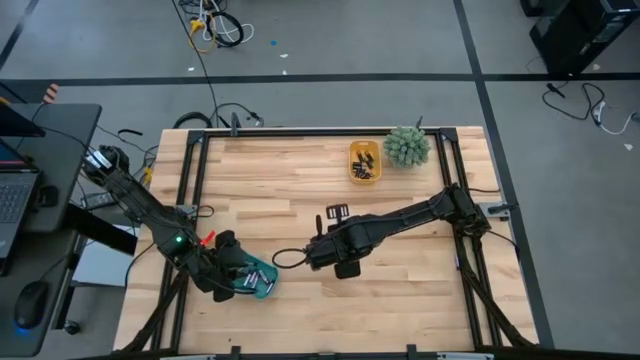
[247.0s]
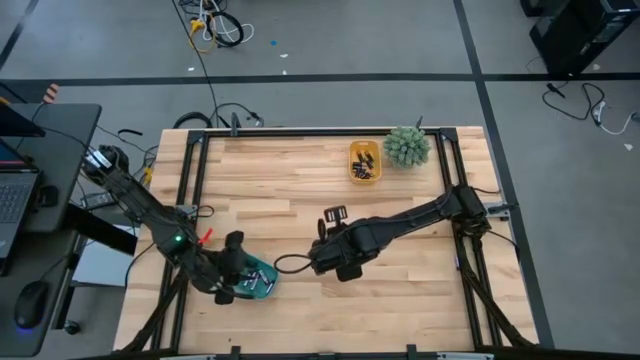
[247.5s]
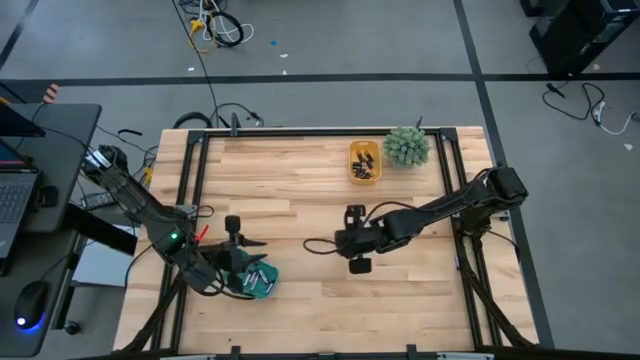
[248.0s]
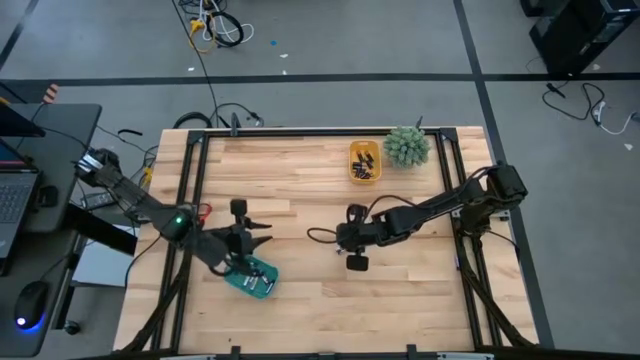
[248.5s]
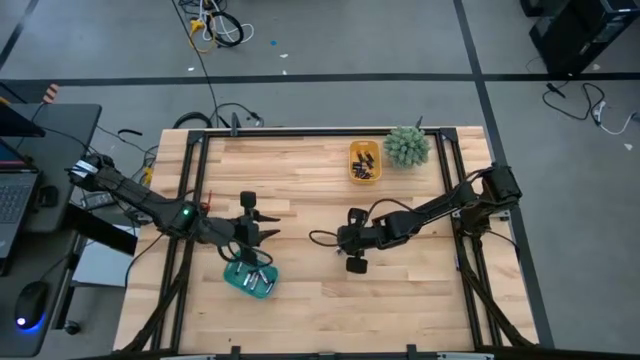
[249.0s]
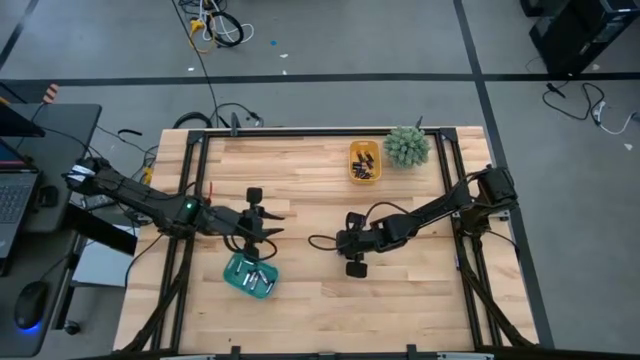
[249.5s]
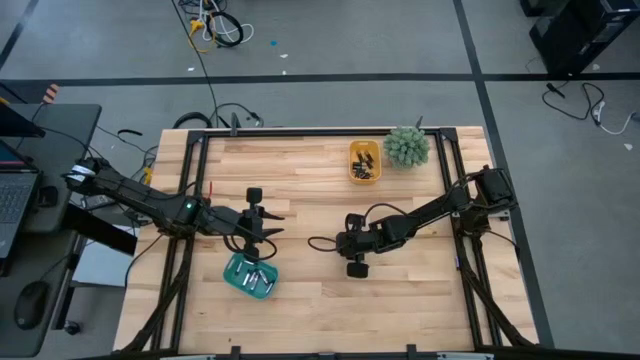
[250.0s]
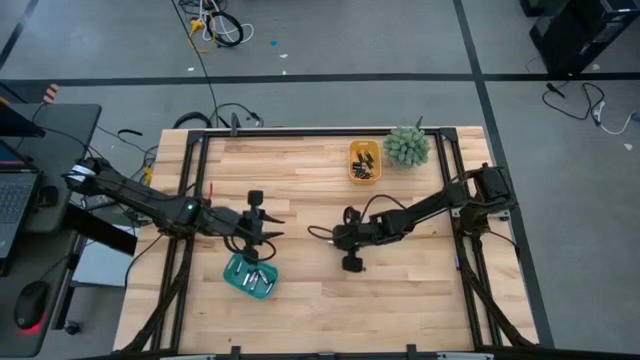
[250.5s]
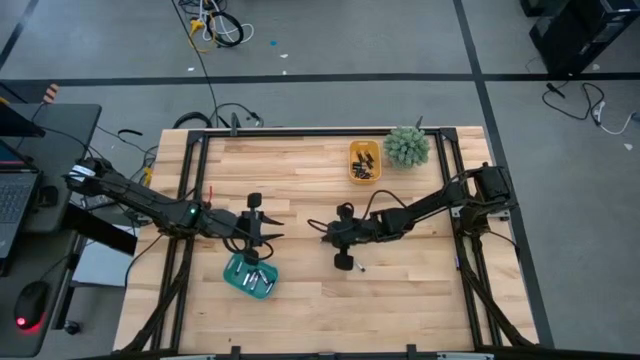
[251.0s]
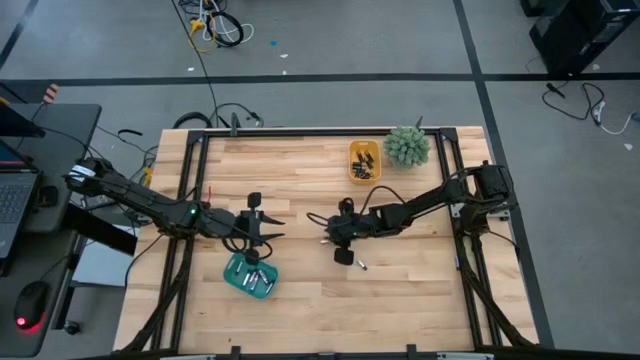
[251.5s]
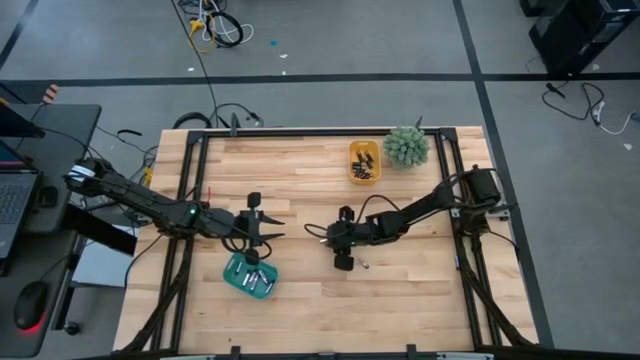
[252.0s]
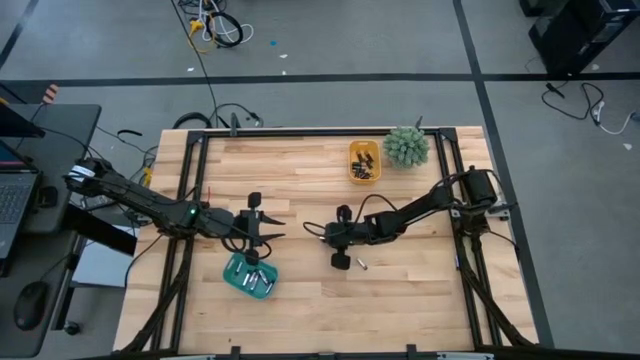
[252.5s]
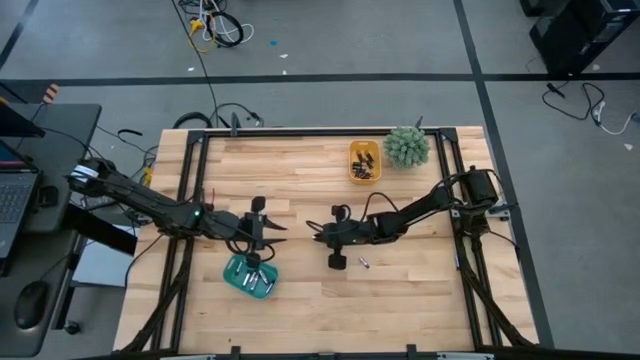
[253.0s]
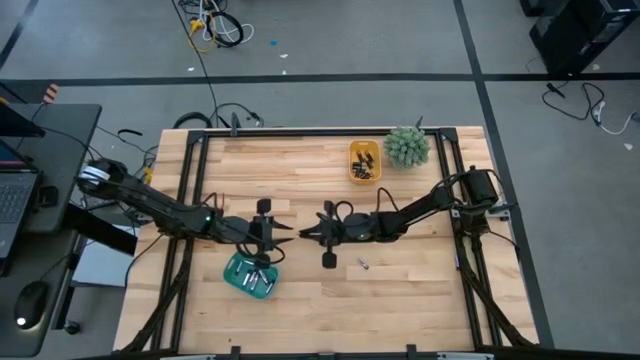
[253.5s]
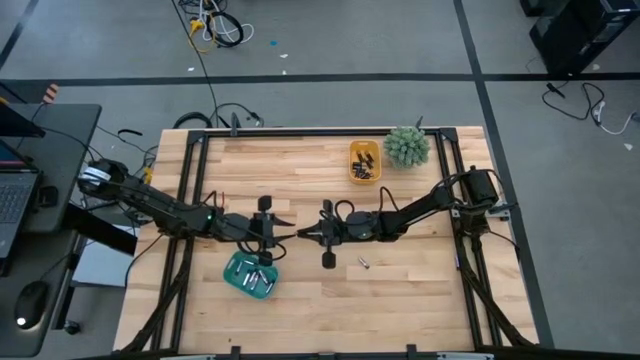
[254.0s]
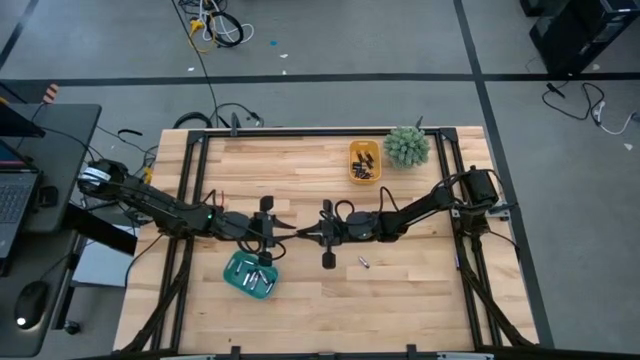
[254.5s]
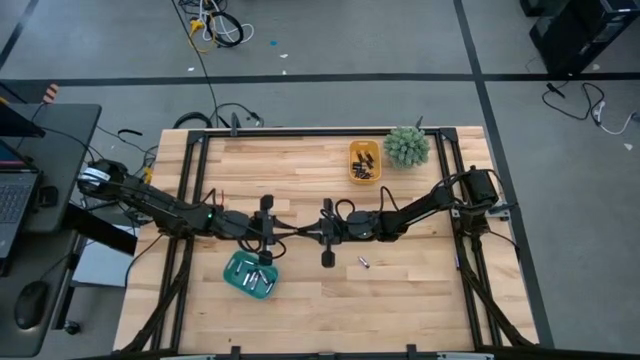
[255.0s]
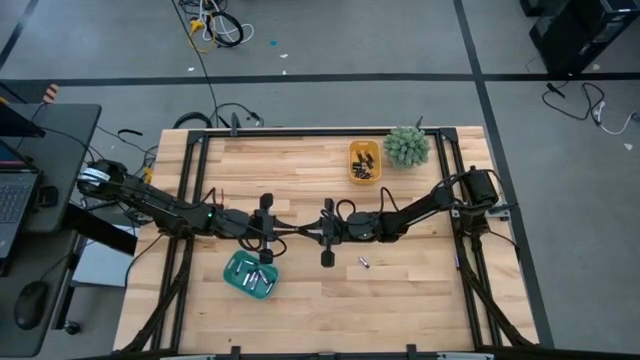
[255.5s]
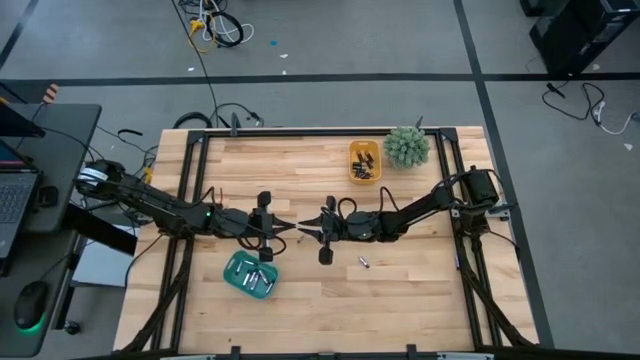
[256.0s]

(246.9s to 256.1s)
Task: Sort batteries
Put the silver battery into the green bin

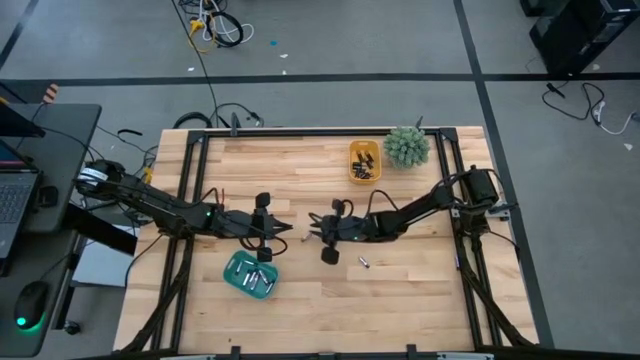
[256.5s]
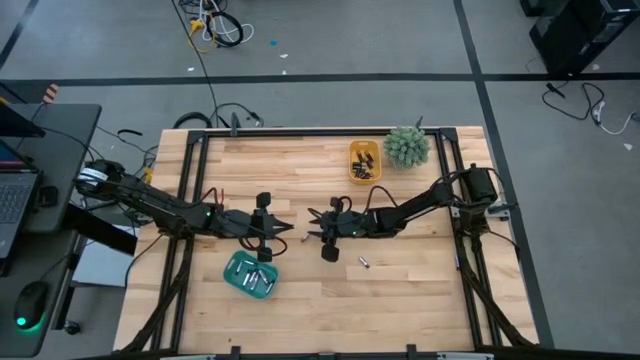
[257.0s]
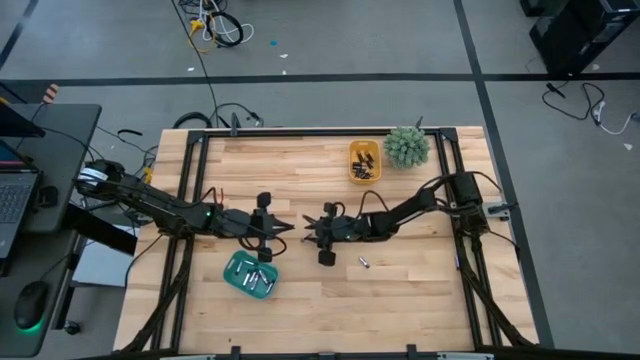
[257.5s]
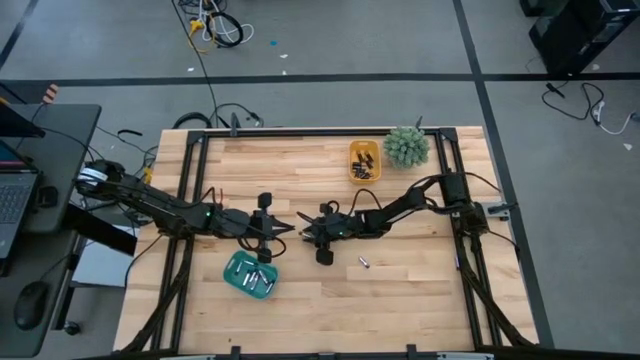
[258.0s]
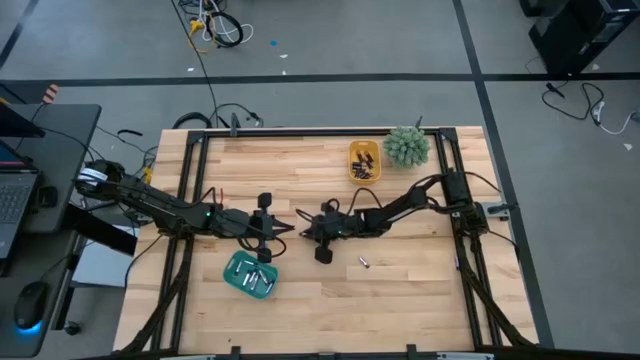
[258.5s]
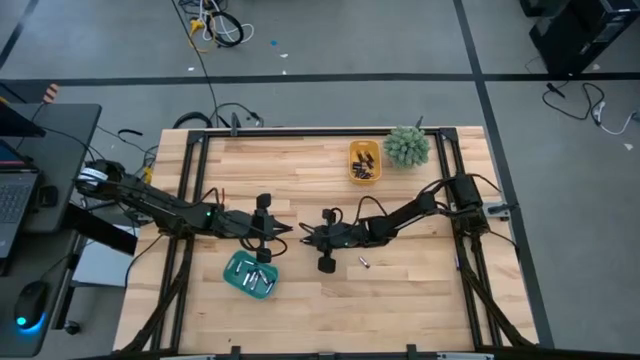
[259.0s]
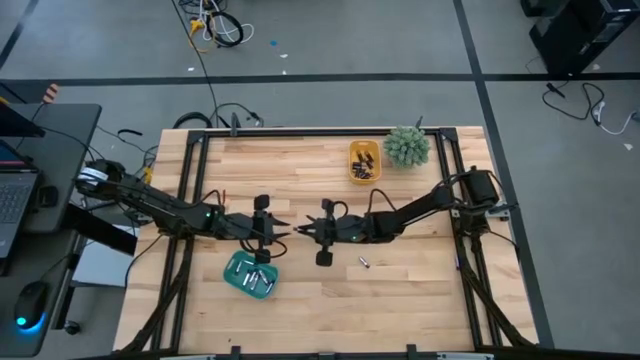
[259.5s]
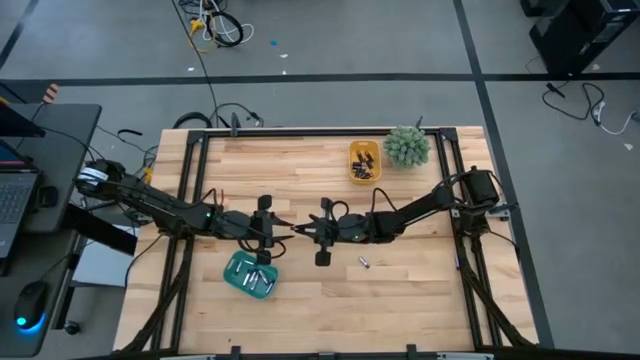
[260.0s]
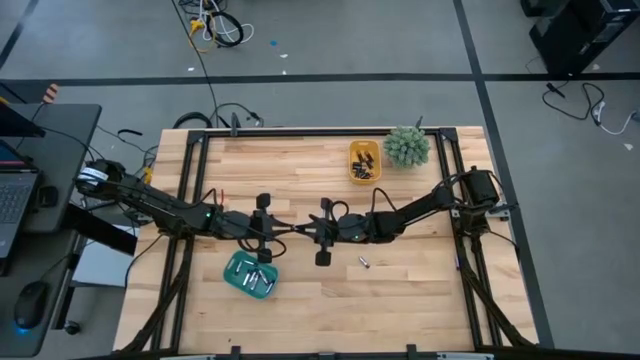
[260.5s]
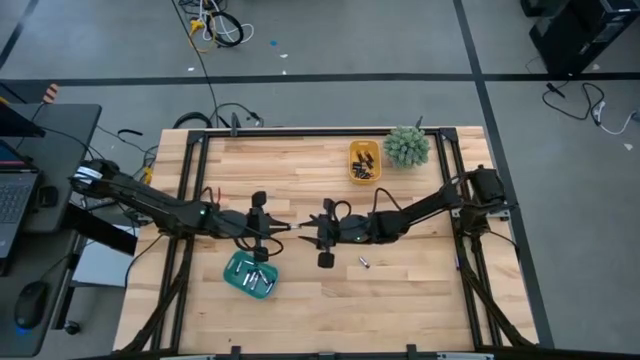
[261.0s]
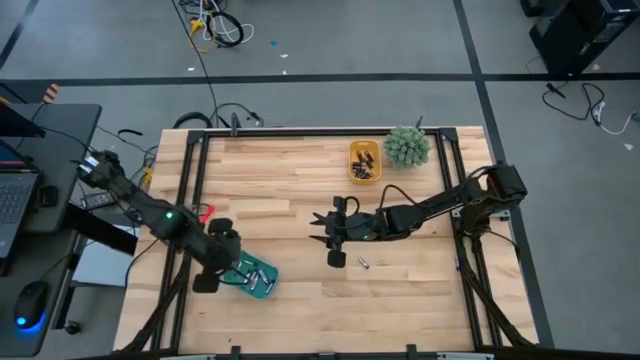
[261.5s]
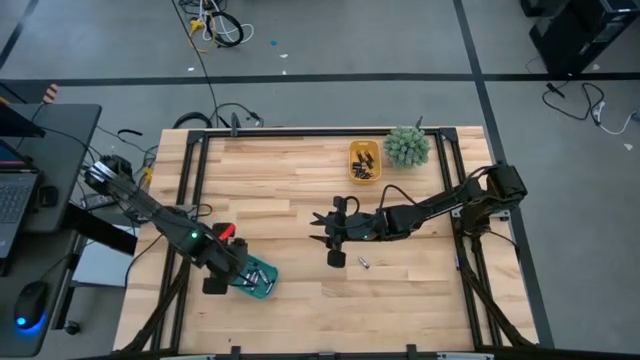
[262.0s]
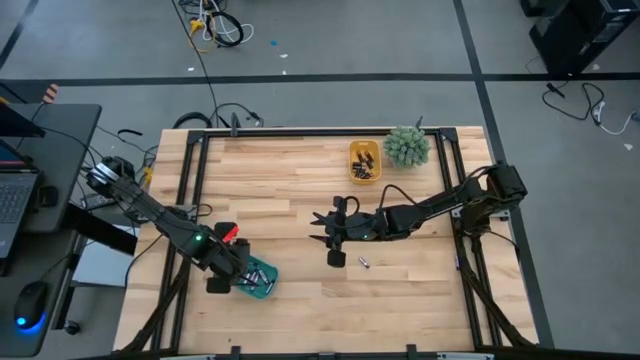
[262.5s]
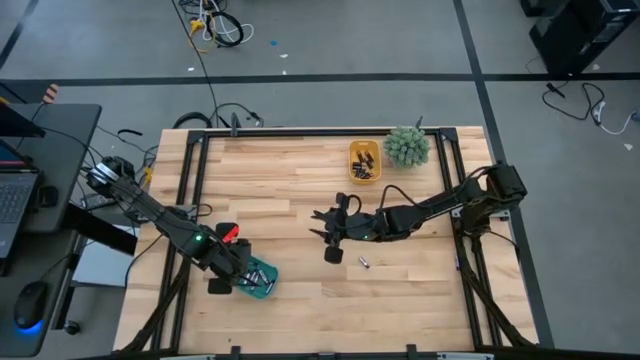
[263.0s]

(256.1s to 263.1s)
Put the silver battery into the green bin

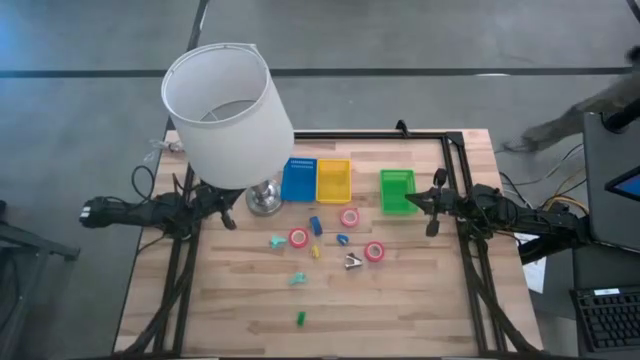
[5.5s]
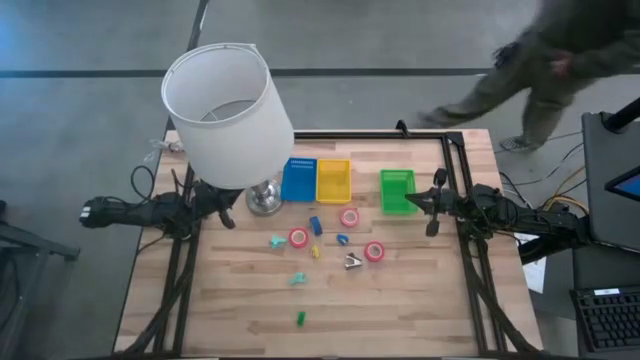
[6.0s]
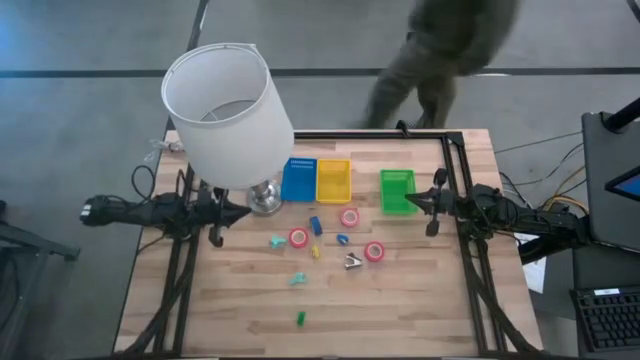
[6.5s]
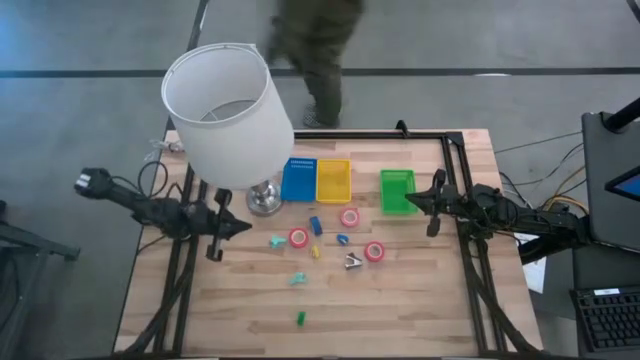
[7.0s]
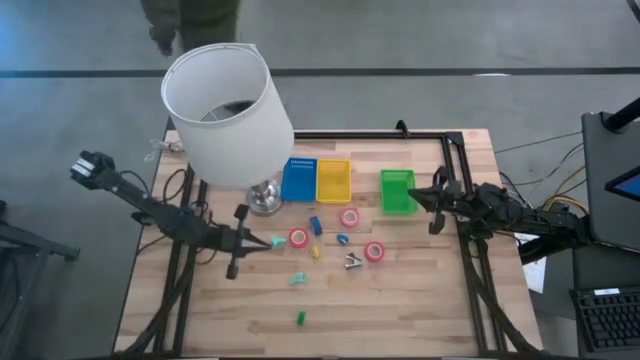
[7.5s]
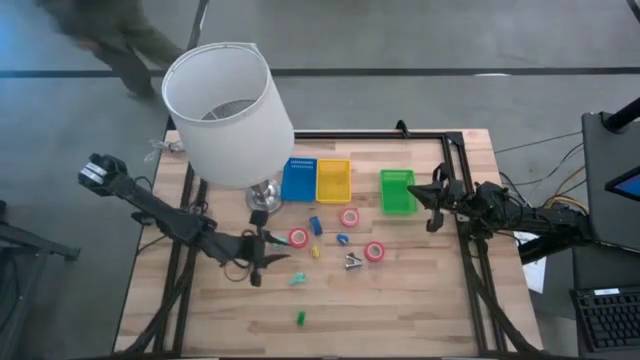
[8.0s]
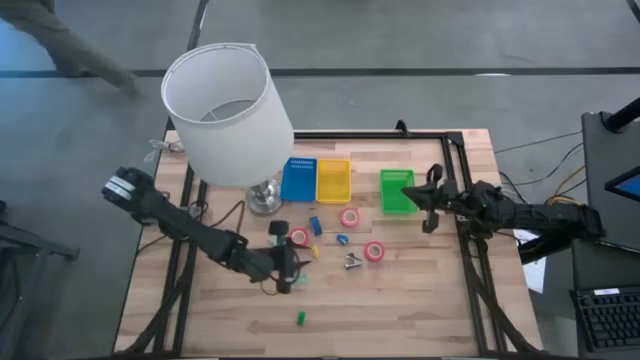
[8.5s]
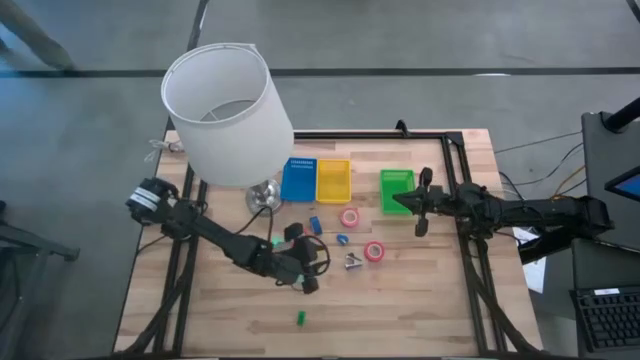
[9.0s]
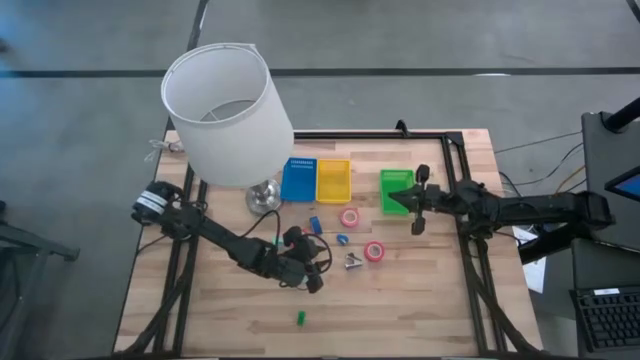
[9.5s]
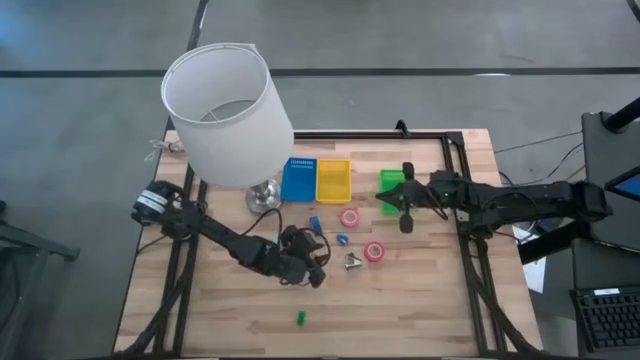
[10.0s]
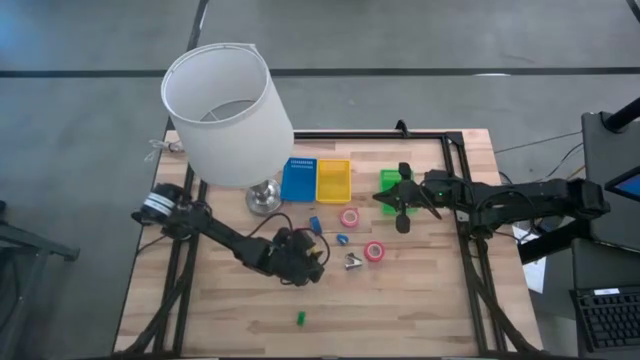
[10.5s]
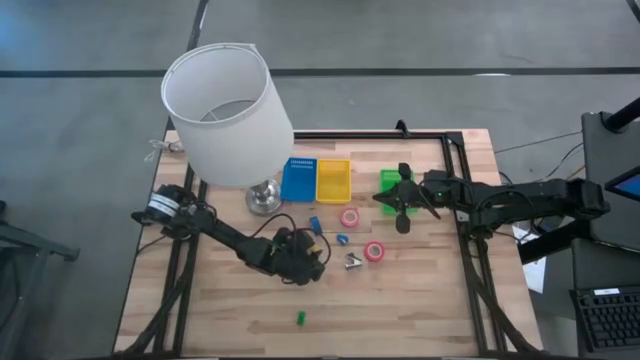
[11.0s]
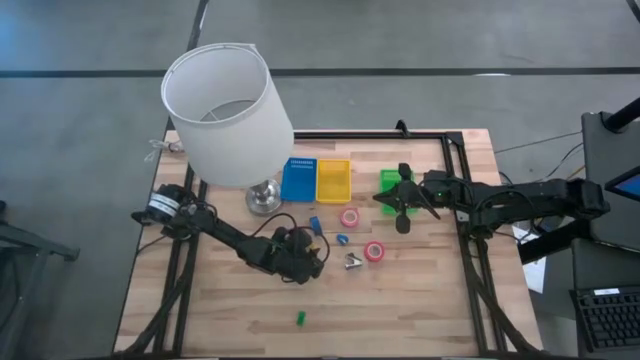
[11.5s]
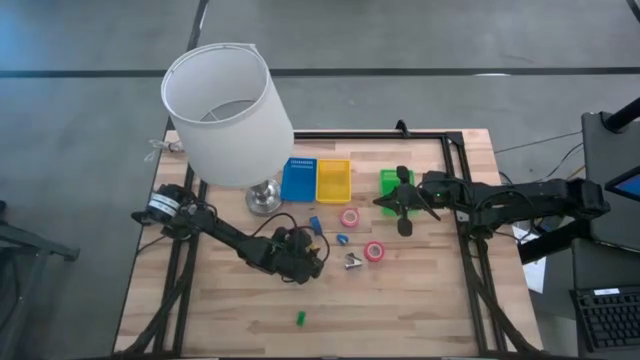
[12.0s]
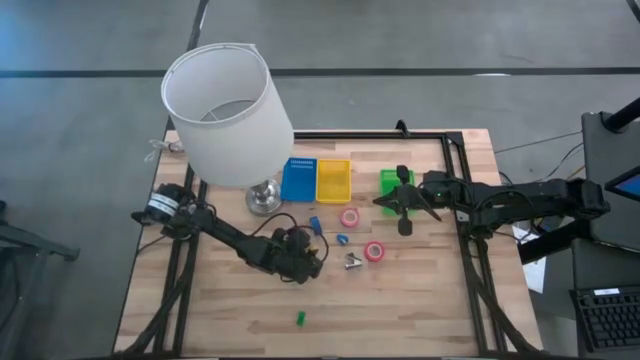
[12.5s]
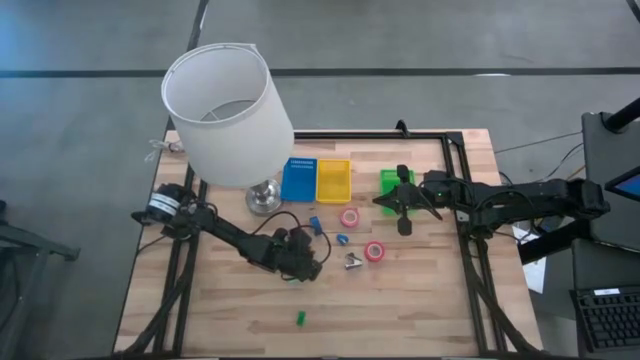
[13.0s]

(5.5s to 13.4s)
Task: Pick and place Stapler, Stapler remover, tape
Put the yellow stapler into the blue bin
